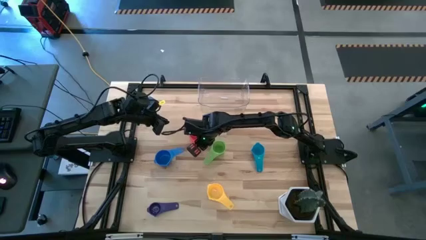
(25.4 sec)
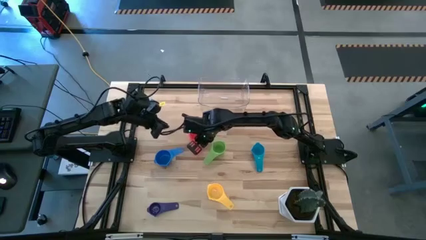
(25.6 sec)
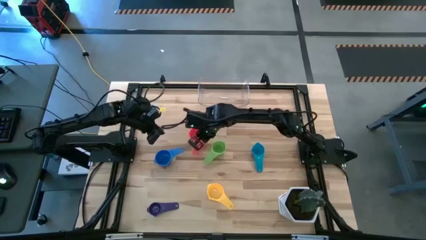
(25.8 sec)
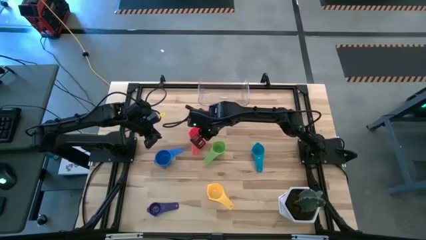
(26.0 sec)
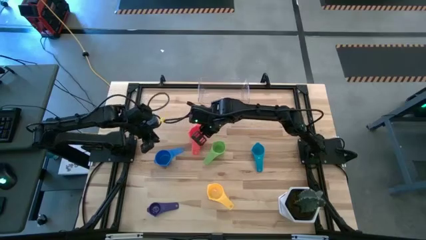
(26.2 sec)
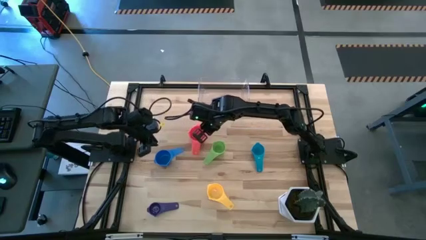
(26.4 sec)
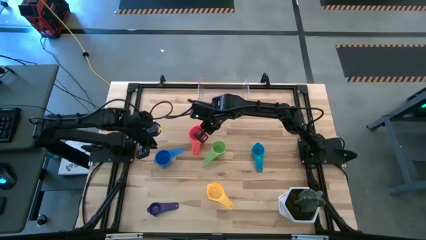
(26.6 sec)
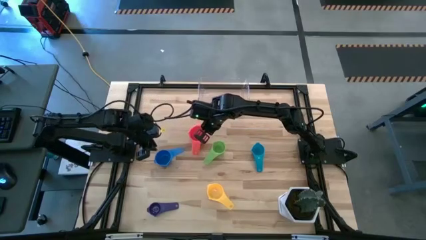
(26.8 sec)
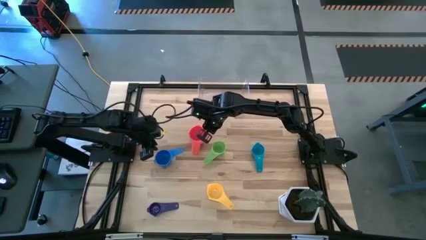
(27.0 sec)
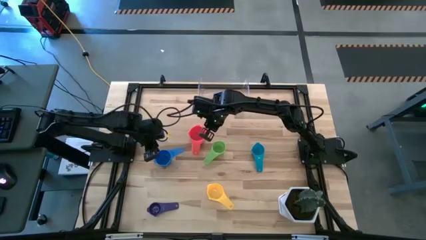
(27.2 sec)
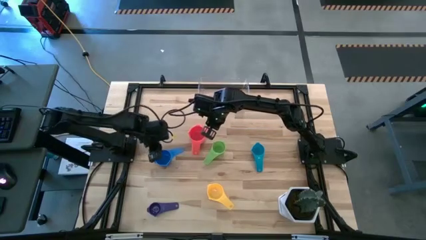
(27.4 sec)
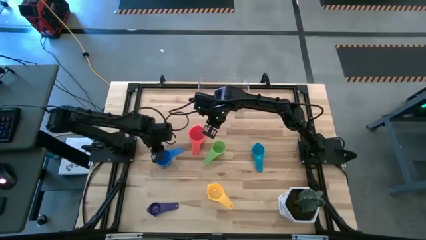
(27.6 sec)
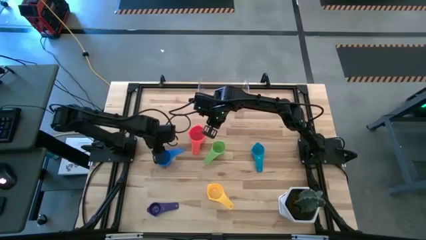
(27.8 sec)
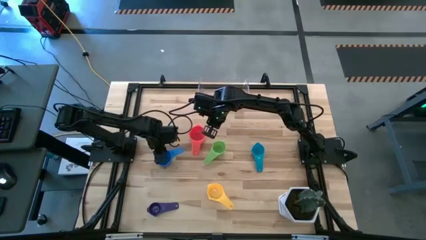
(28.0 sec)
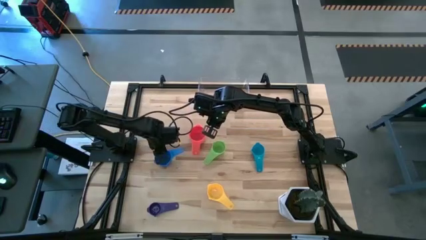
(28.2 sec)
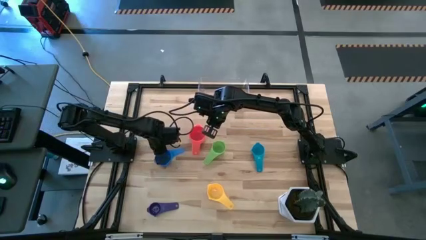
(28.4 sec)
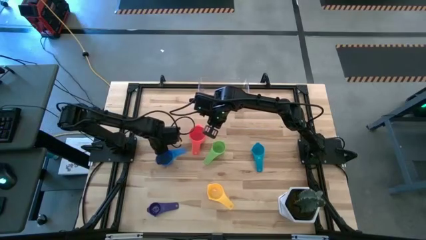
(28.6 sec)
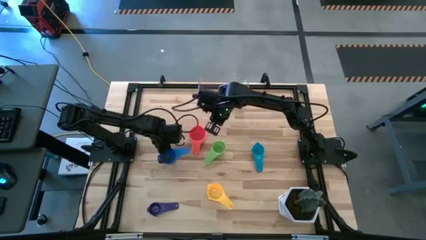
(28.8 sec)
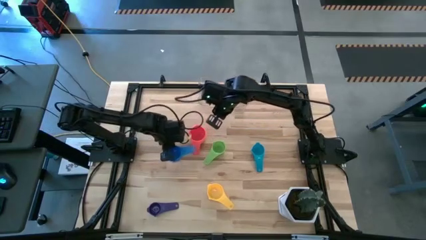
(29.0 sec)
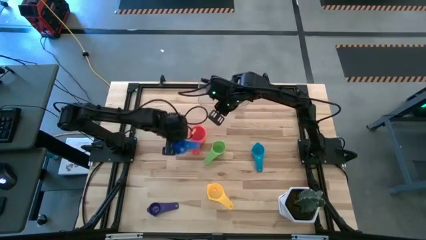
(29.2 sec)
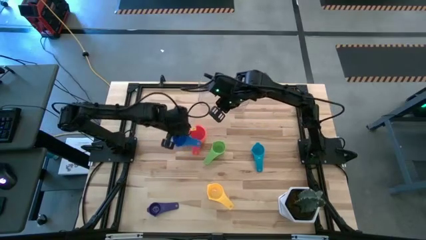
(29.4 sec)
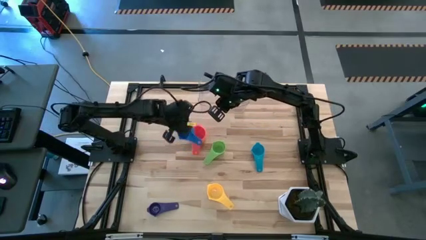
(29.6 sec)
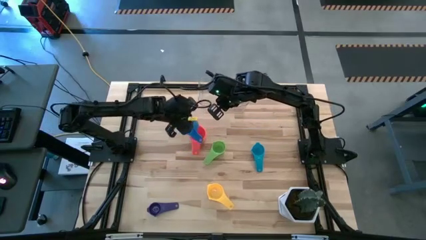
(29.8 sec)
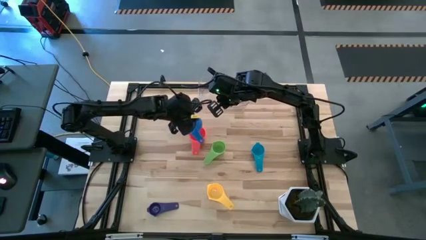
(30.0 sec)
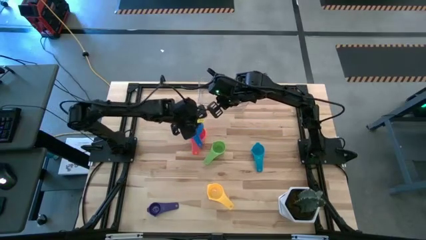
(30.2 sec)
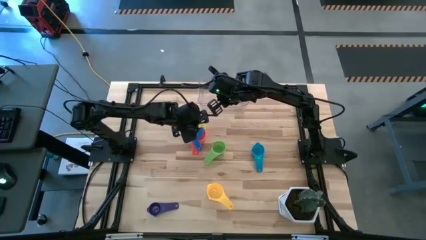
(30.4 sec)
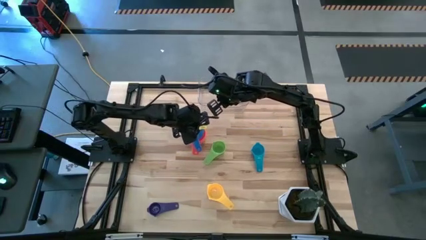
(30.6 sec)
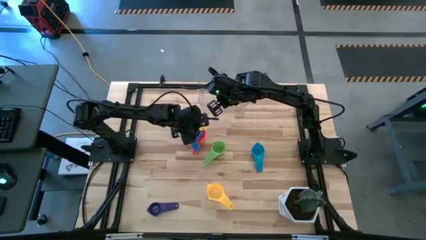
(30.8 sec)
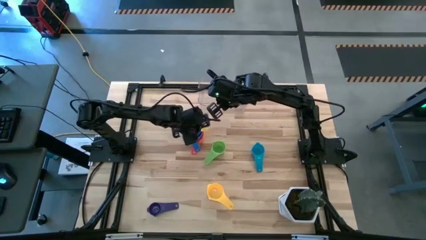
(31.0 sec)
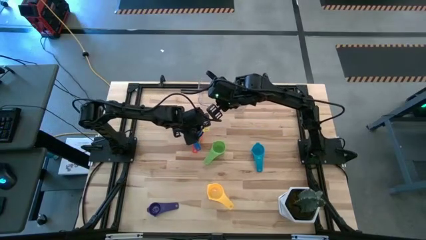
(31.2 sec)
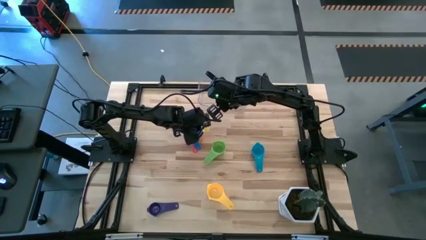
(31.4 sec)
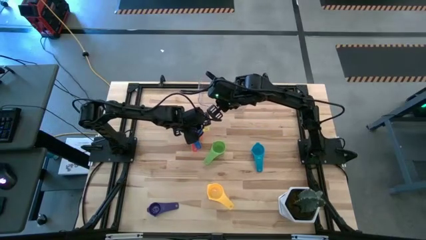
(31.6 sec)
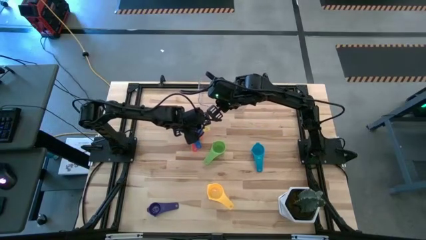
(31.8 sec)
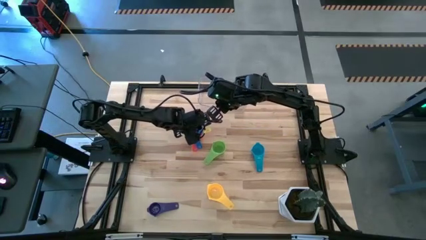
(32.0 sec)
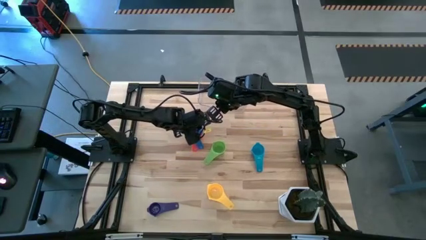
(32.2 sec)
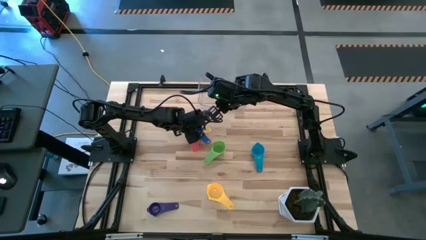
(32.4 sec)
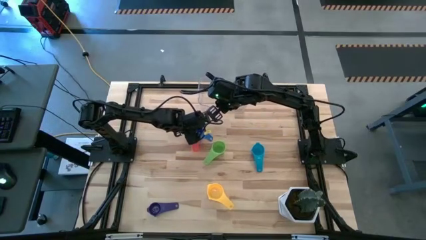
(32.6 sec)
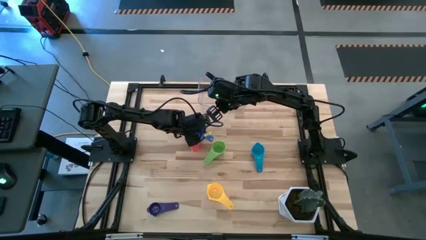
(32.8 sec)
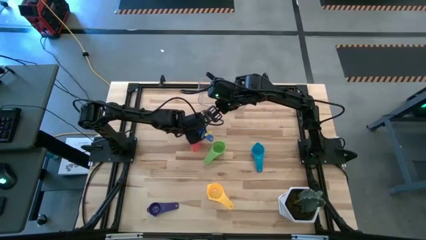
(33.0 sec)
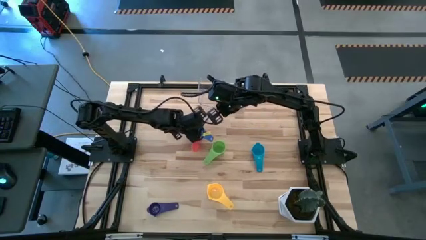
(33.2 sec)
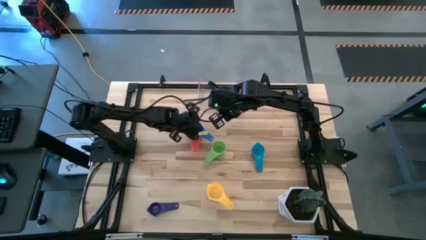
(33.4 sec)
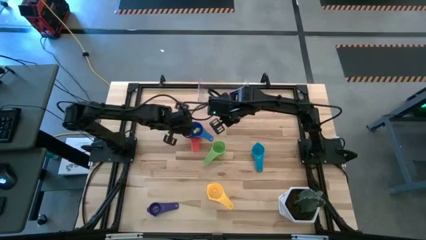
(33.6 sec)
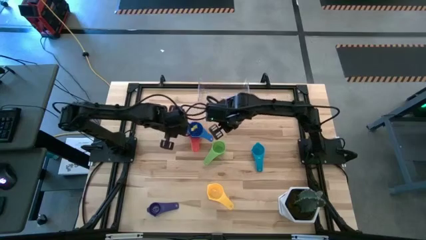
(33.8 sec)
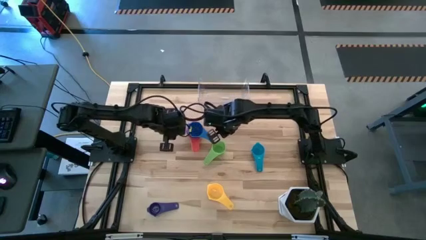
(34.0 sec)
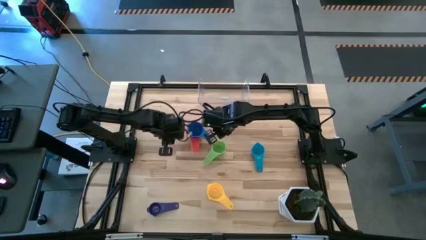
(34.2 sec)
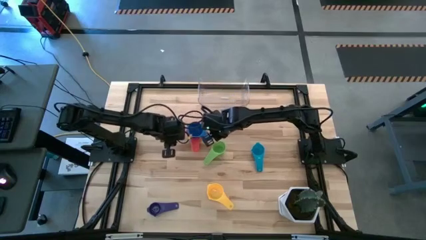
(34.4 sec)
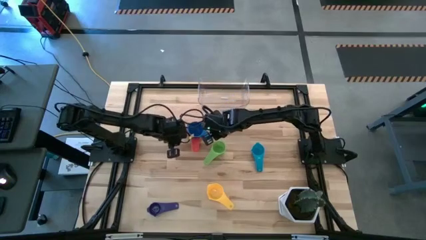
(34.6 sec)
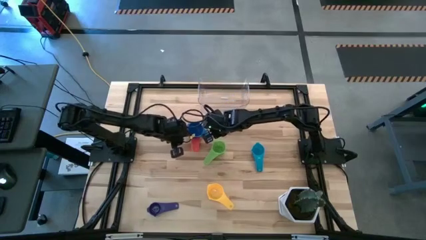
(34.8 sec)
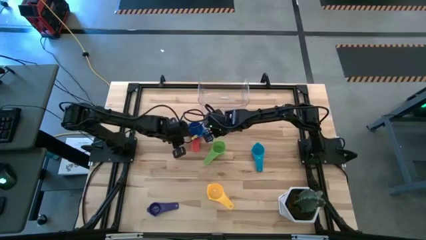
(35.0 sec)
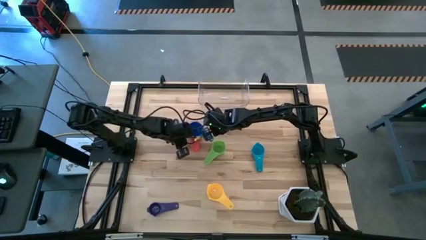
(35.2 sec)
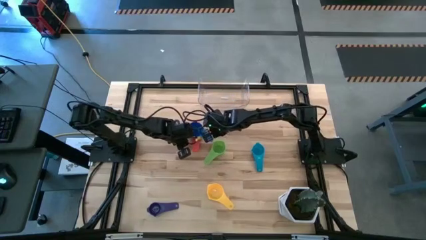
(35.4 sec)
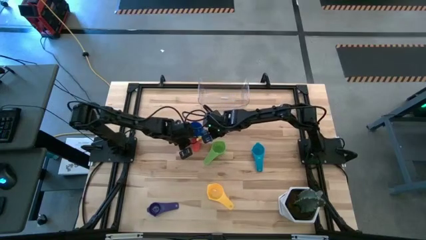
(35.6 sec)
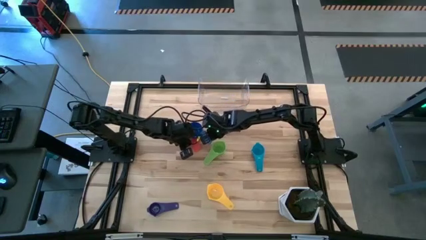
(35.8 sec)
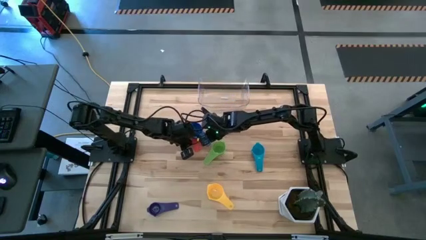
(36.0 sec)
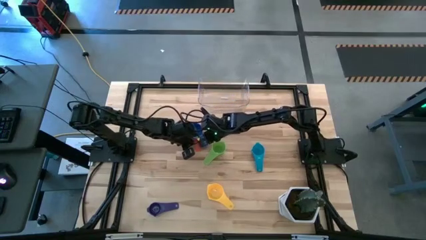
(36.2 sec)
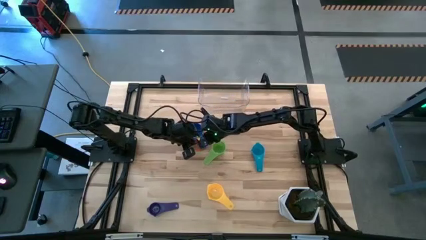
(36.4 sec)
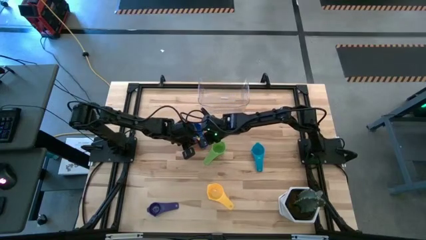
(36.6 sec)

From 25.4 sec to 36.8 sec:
Task: Nest measuring cups in basket
Stack the blue measuring cup on top of the red measuring cup

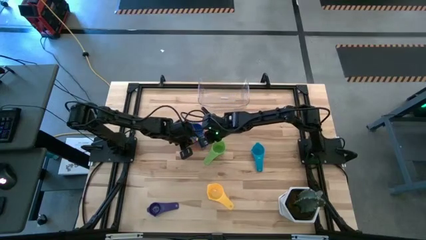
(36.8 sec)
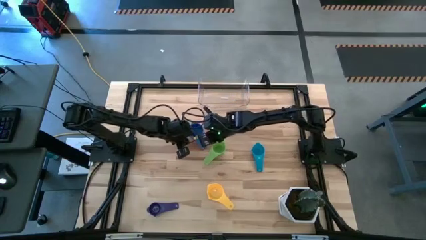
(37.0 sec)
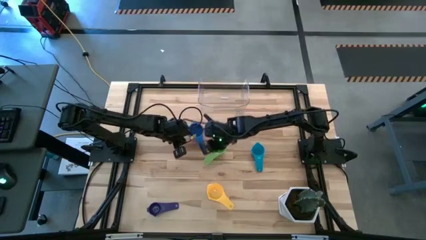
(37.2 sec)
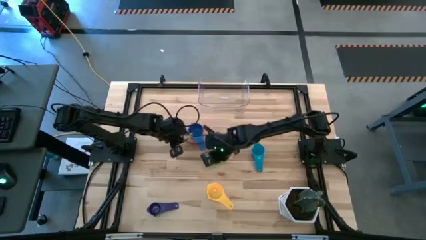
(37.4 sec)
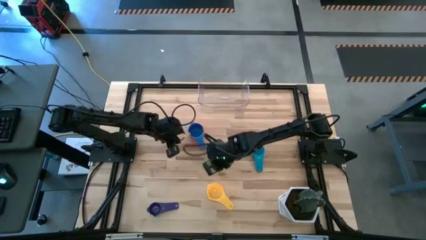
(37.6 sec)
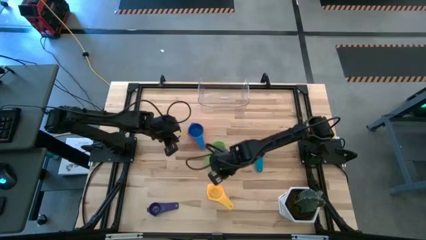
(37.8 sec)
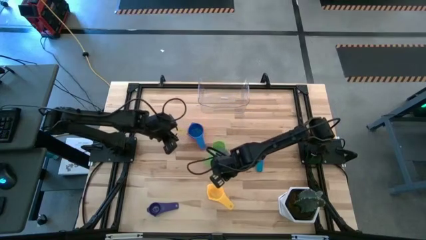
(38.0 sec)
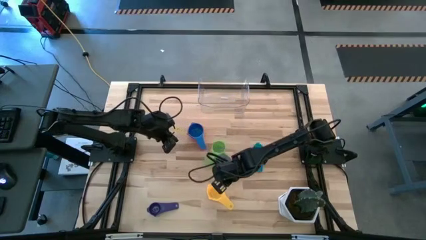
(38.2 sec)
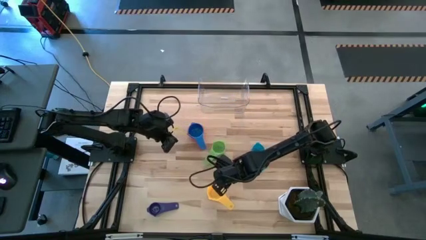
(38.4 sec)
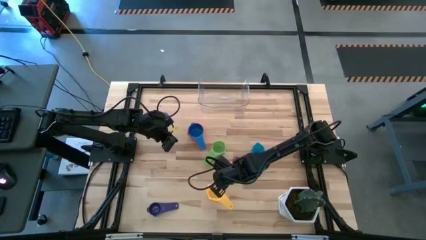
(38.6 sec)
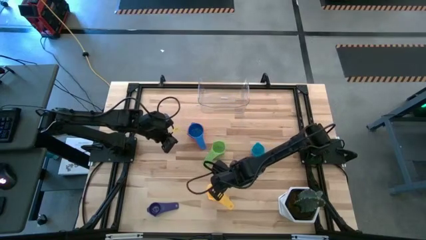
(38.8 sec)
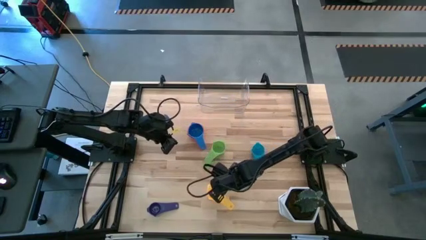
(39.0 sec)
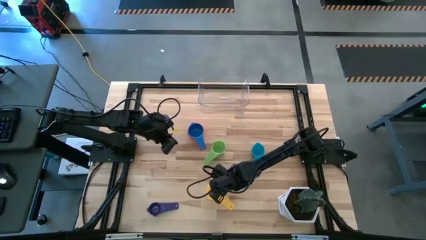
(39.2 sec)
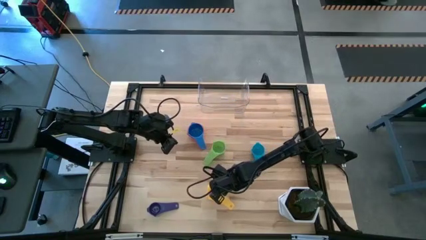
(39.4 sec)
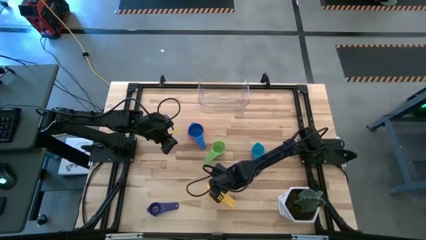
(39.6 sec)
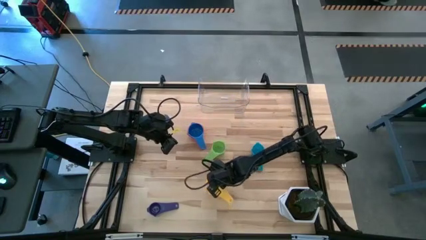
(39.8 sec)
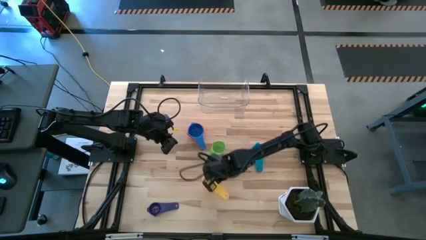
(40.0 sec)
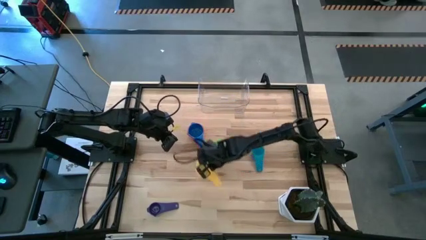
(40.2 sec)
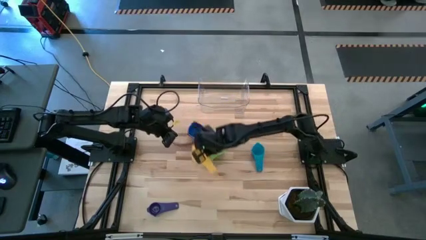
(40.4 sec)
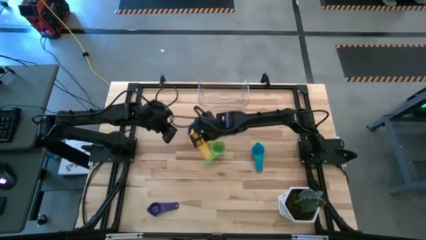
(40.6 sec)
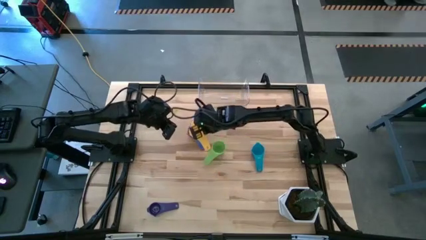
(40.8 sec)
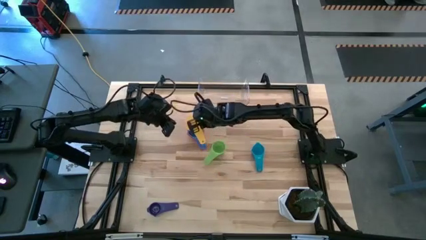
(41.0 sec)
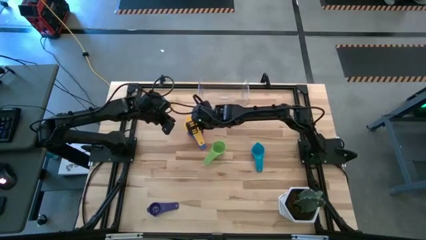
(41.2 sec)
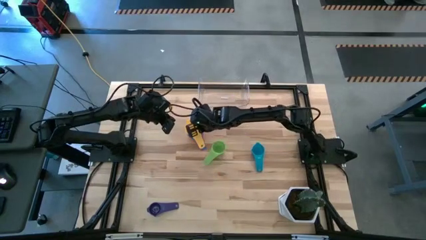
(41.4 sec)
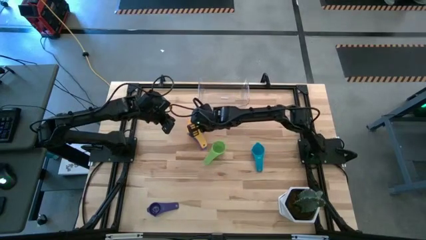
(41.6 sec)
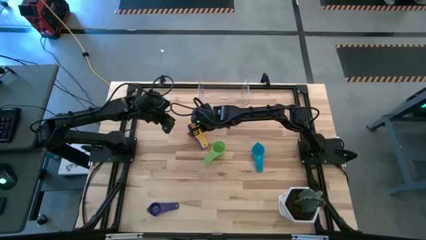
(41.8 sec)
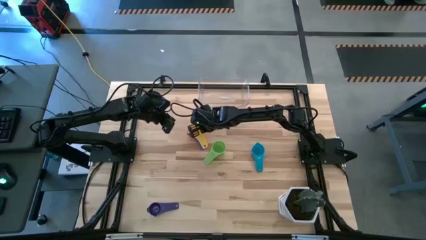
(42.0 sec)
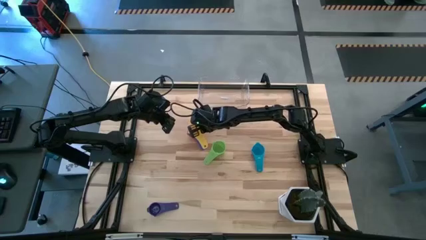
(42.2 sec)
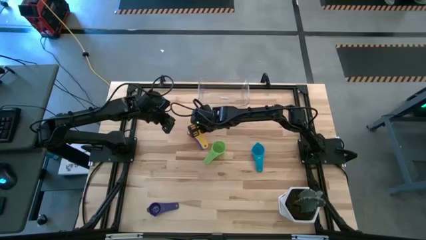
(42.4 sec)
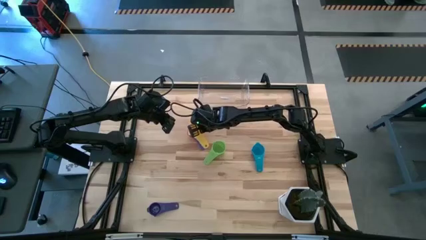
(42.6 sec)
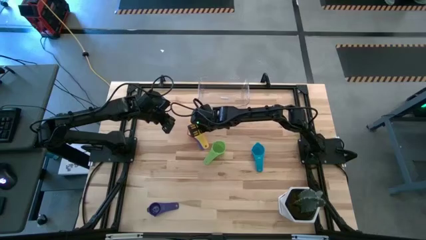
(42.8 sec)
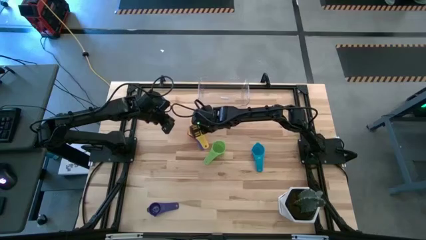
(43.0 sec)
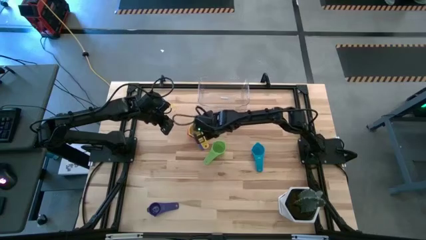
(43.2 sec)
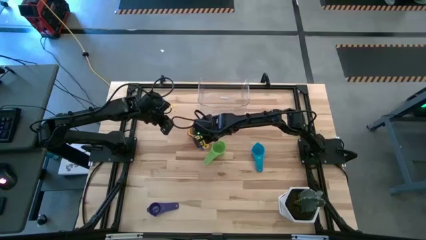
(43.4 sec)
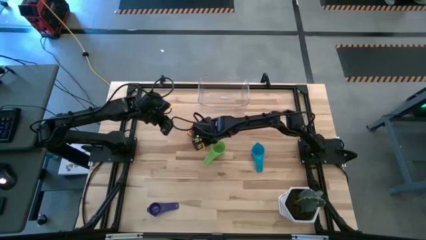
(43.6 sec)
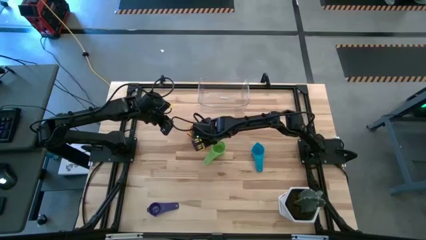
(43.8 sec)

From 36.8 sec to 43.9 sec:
Stack the yellow measuring cup on top of the blue measuring cup
